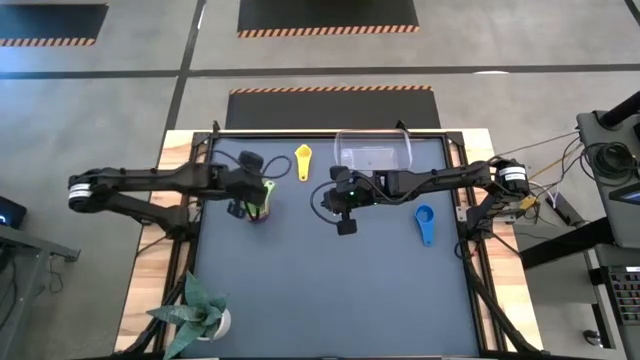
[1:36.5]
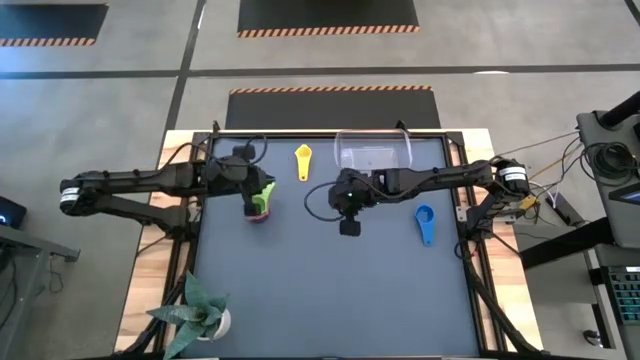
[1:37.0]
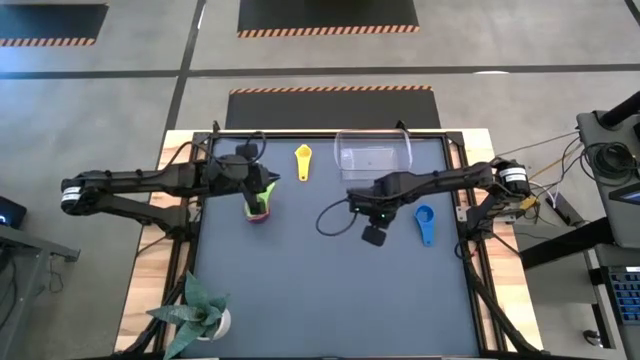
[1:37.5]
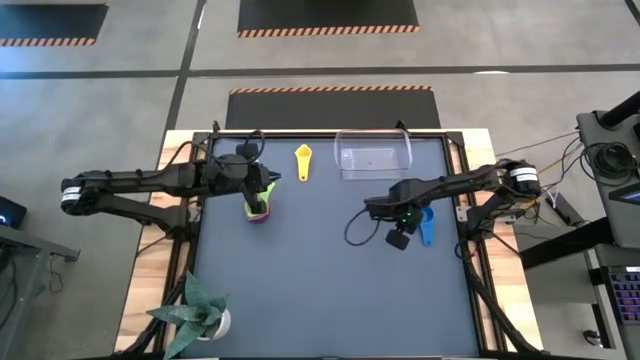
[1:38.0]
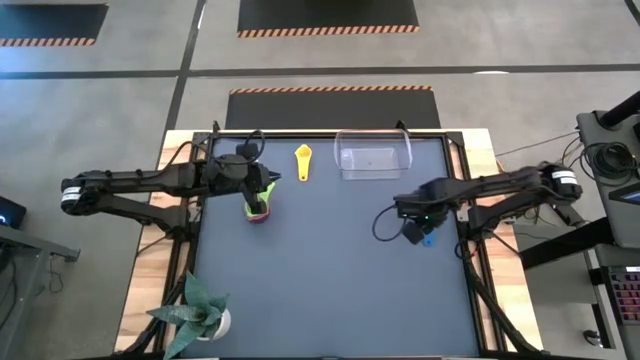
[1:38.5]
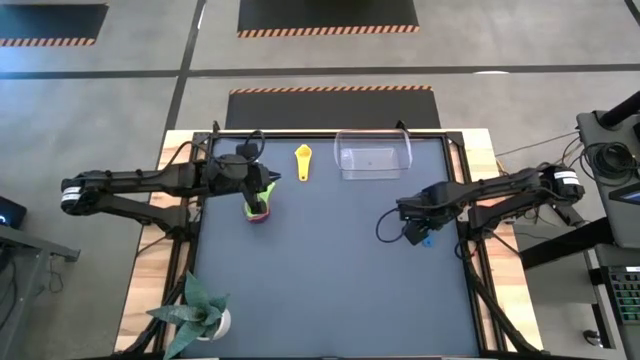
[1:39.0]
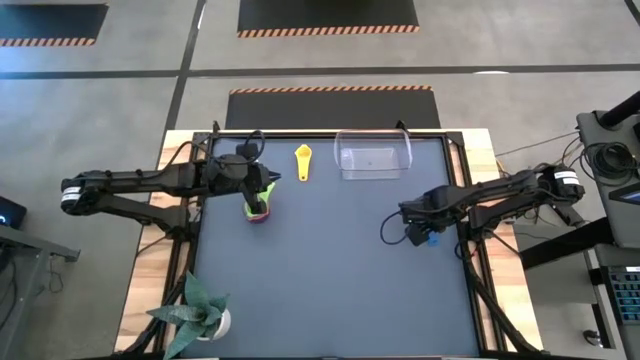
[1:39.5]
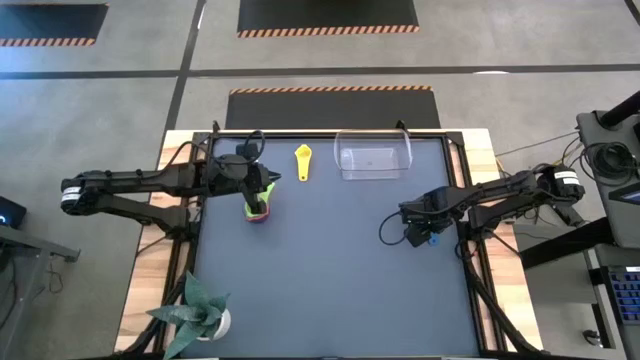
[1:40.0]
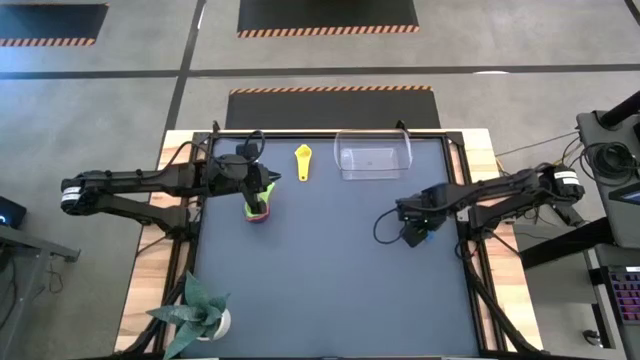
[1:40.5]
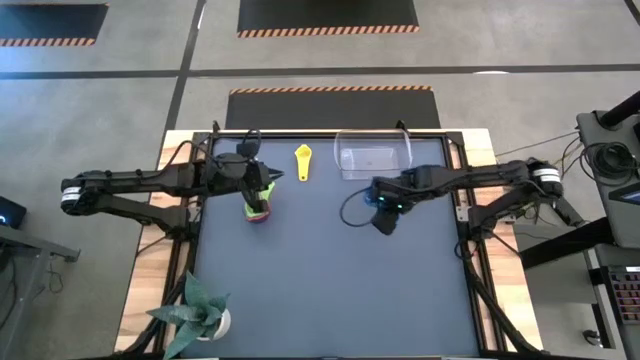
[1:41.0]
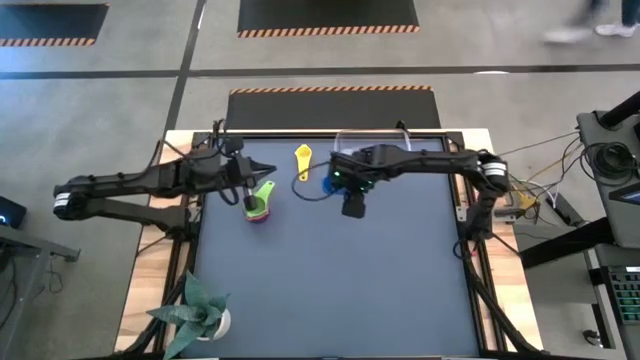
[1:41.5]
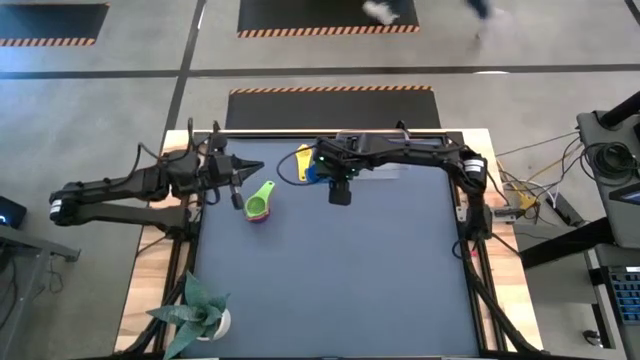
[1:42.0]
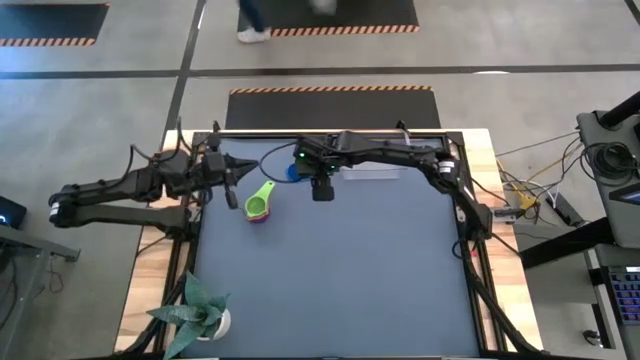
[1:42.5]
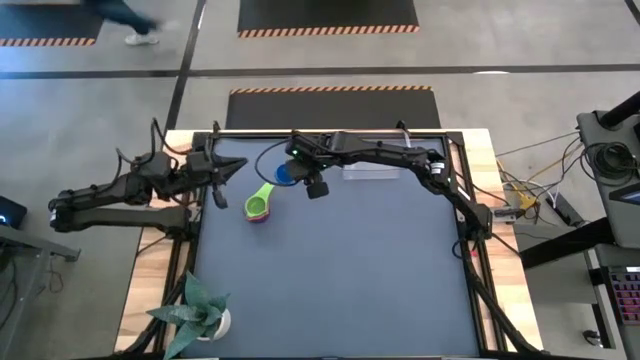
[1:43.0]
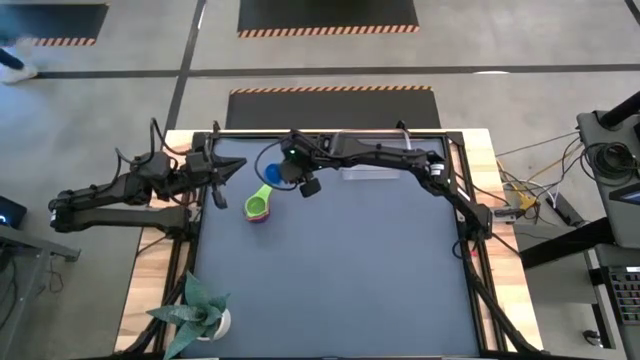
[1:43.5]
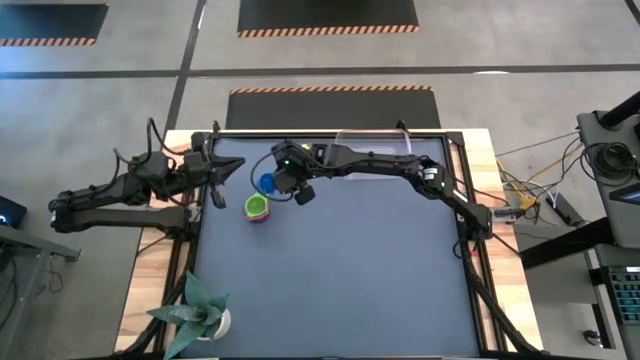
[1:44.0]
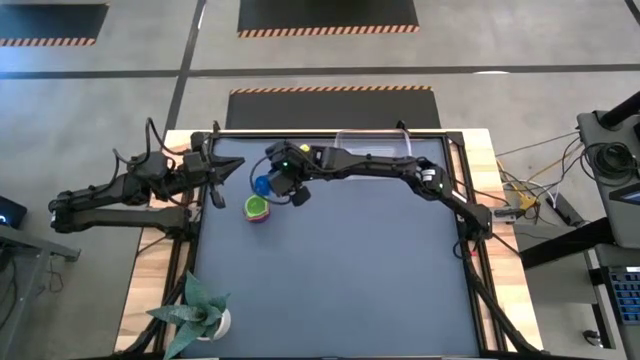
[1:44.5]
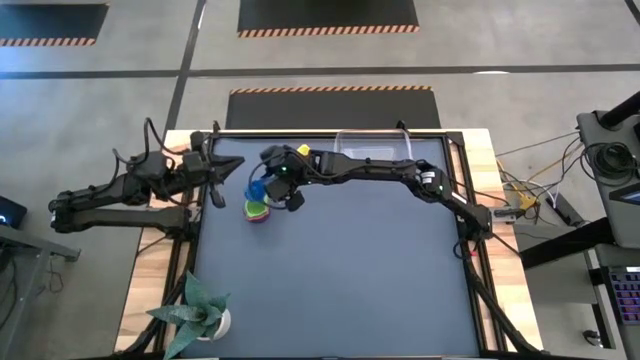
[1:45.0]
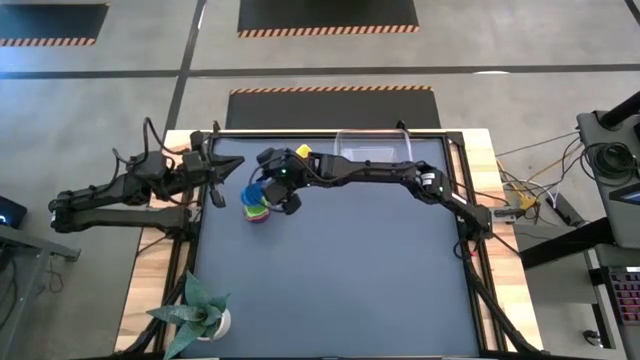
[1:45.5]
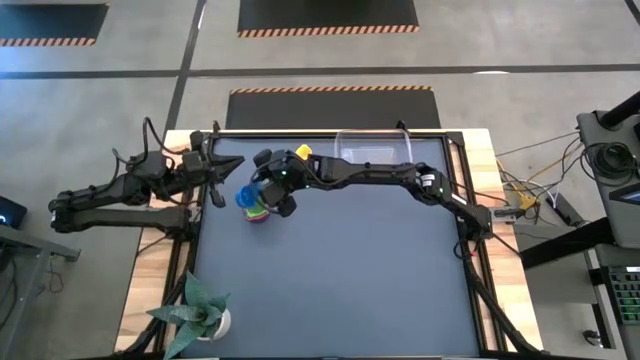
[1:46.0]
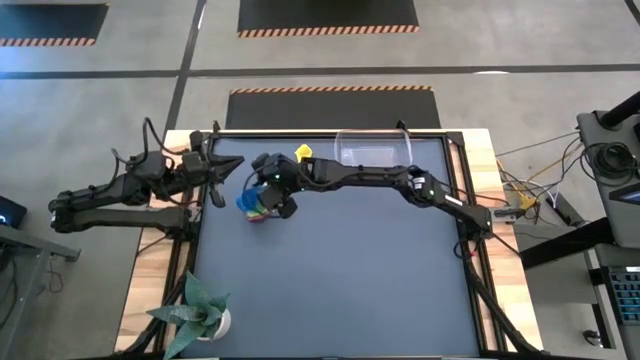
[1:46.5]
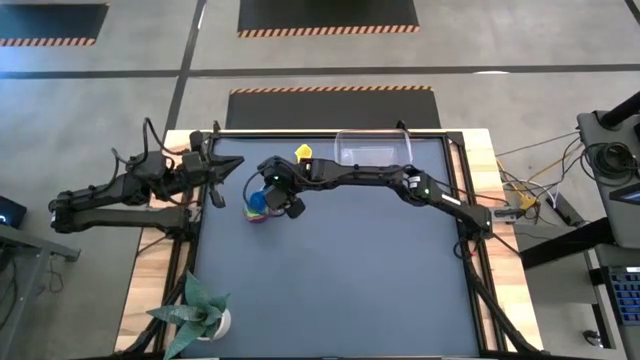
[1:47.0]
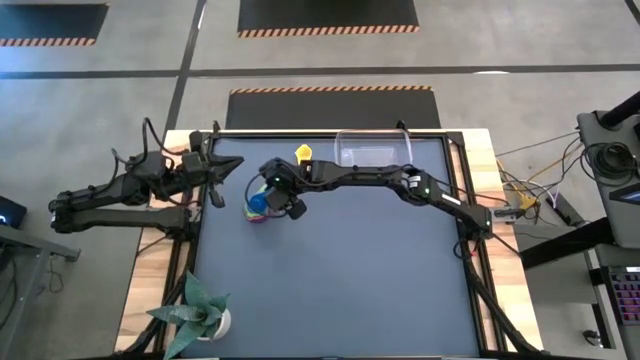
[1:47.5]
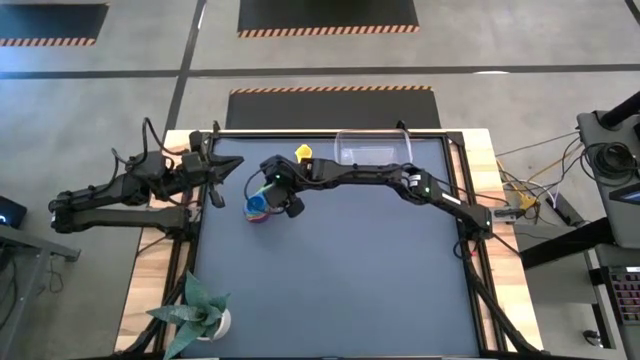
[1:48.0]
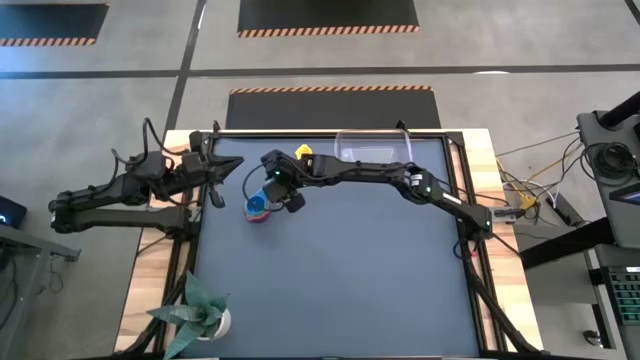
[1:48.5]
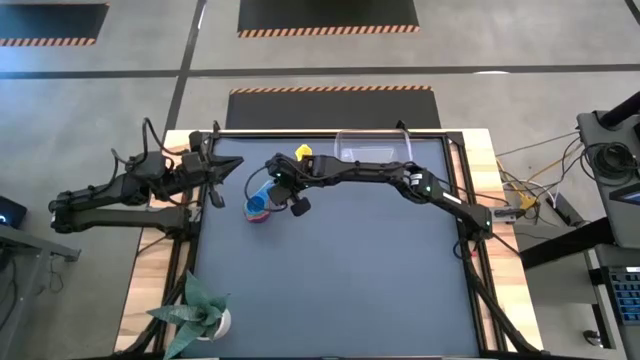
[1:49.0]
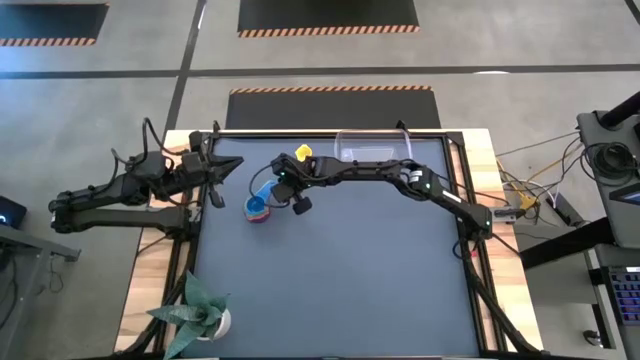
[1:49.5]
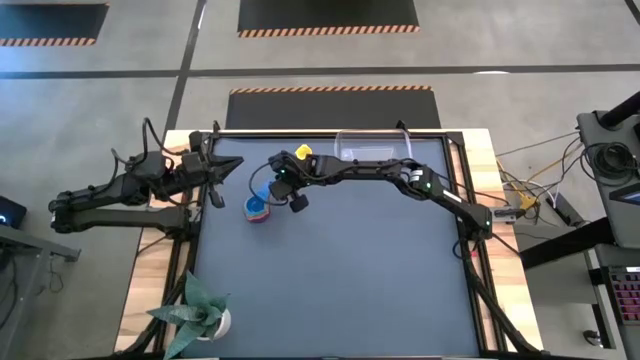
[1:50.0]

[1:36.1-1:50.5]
Task: Nest measuring cups in basket
Stack the blue measuring cup on top of the green measuring cup

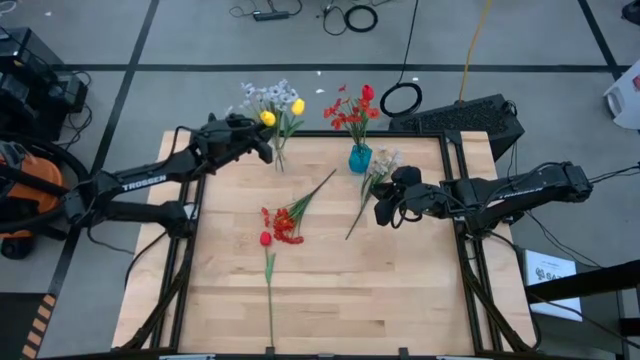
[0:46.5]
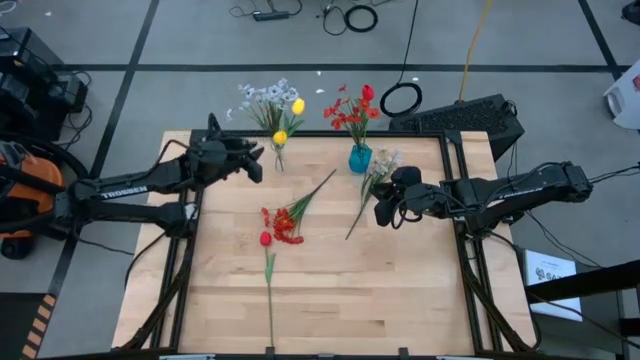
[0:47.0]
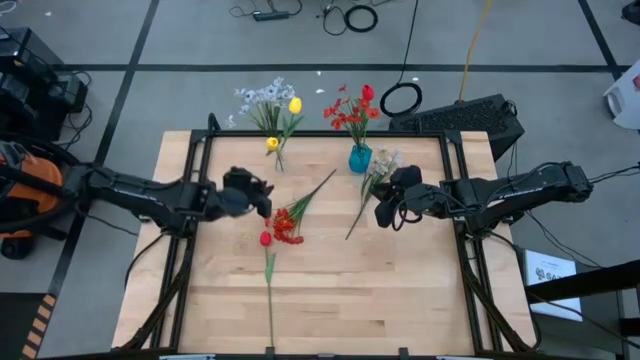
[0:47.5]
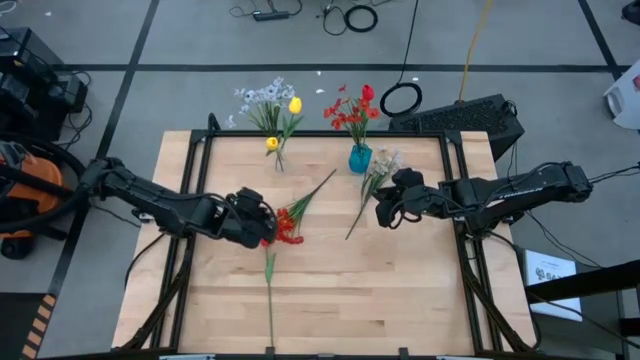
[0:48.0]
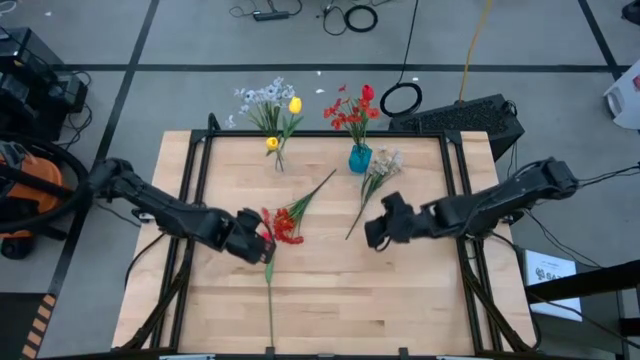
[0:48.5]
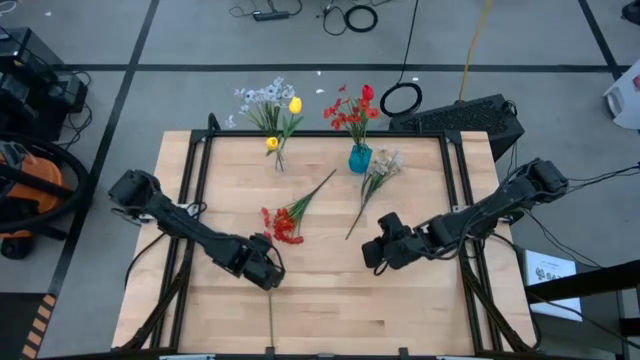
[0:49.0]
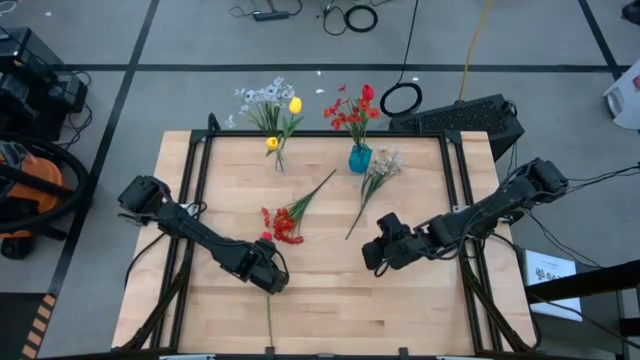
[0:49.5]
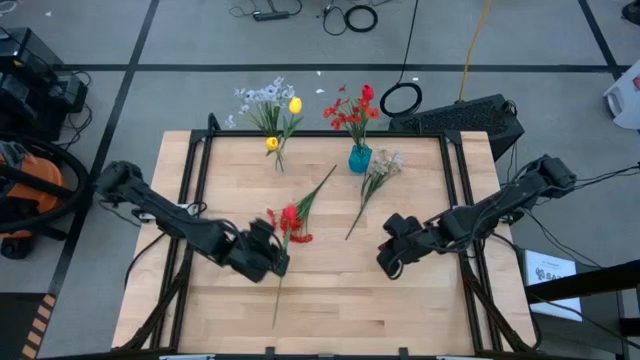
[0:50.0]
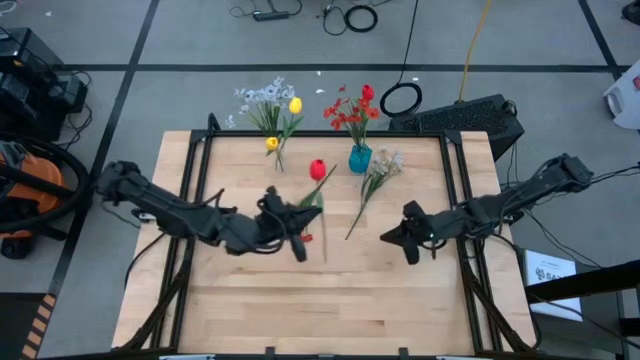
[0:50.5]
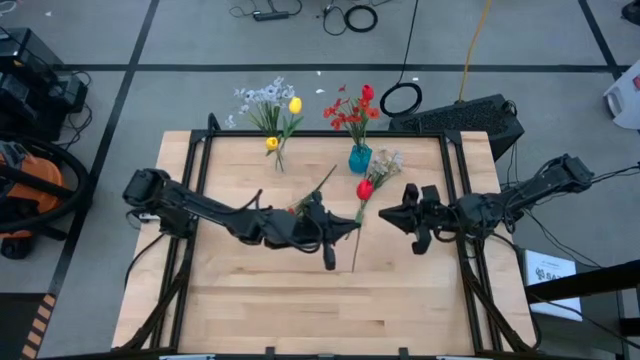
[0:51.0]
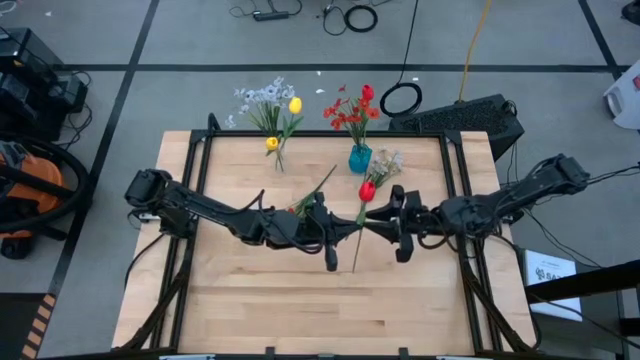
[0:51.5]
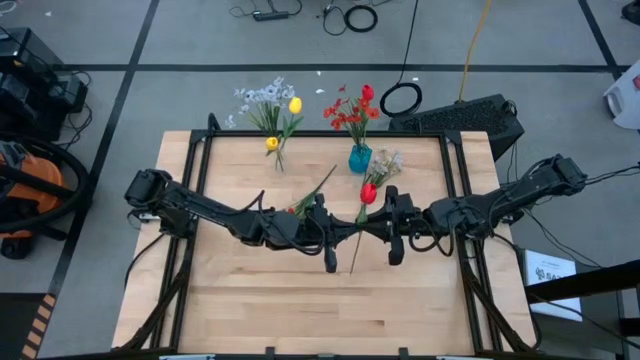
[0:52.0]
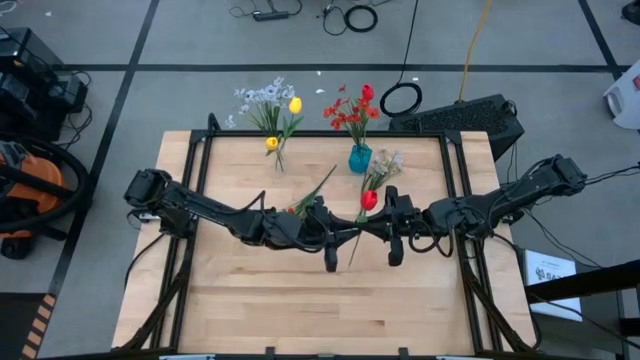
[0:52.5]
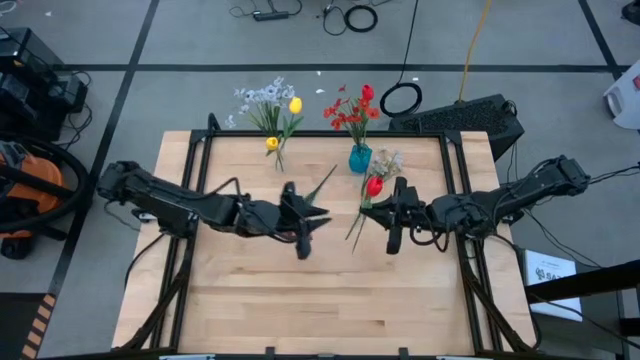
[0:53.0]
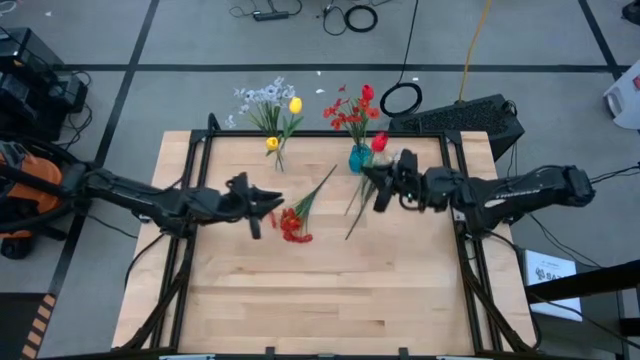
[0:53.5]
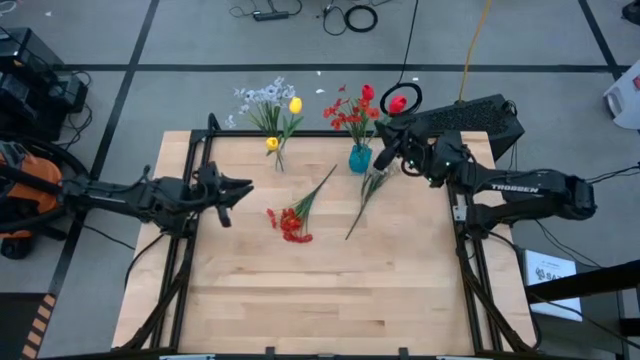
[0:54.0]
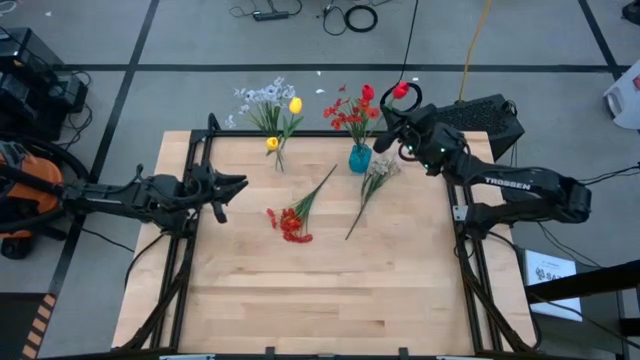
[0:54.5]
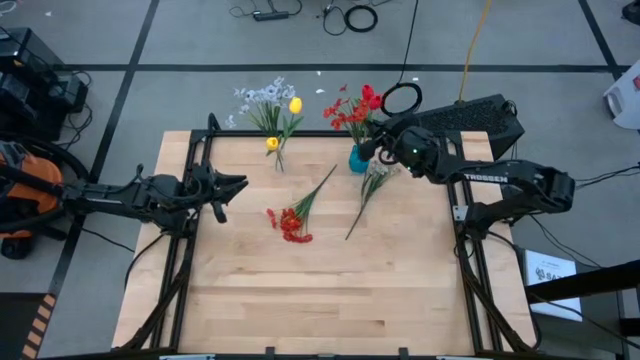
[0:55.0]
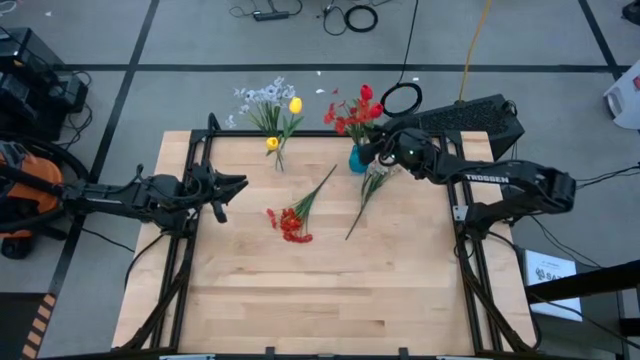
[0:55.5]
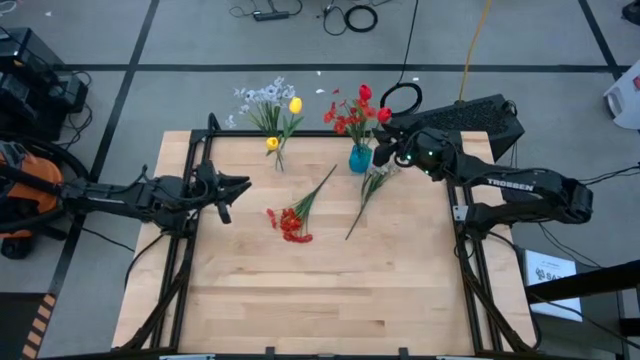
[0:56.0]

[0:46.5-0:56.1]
Task: Sort flowers into vase by color
Put the red flower into the blue vase
